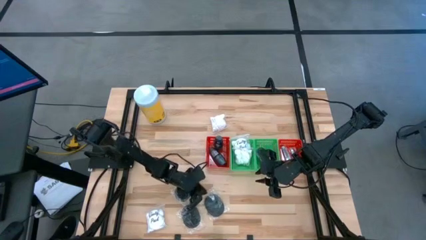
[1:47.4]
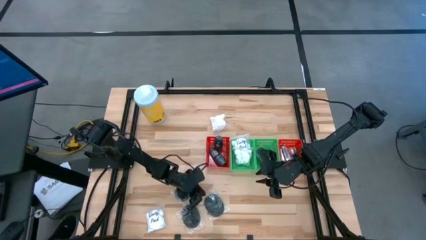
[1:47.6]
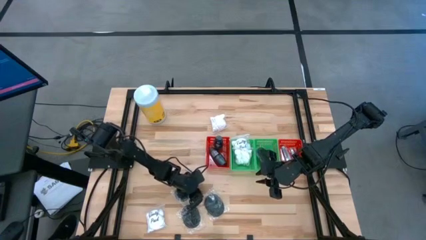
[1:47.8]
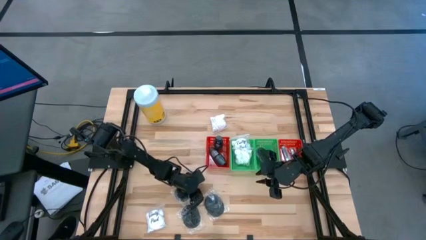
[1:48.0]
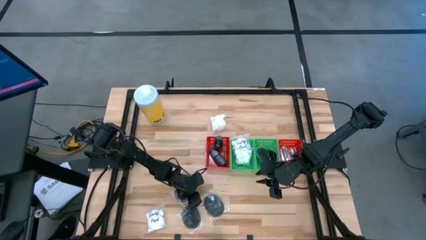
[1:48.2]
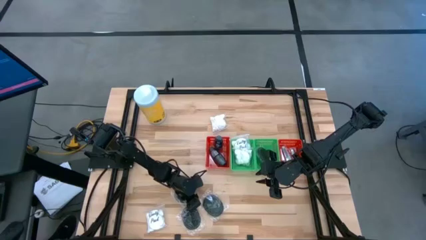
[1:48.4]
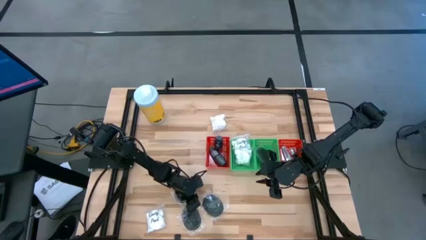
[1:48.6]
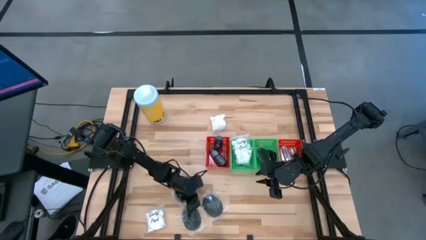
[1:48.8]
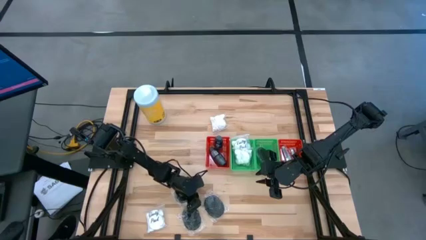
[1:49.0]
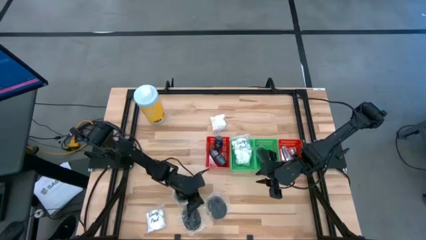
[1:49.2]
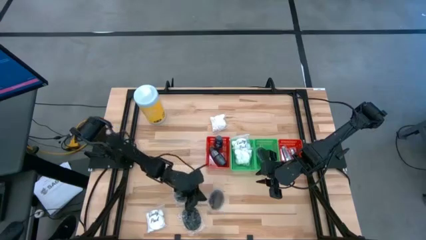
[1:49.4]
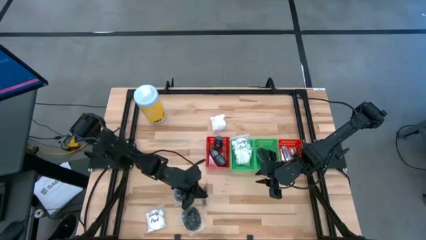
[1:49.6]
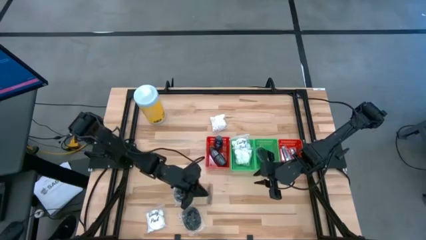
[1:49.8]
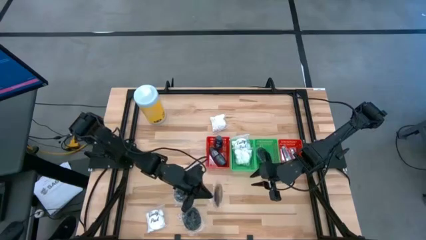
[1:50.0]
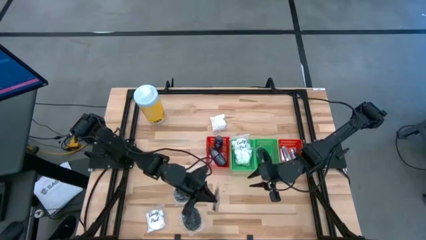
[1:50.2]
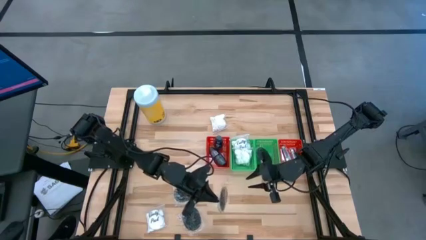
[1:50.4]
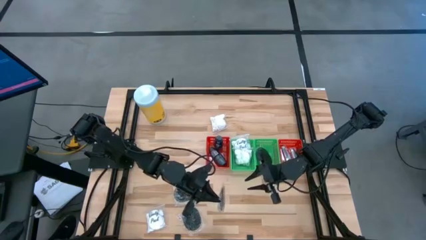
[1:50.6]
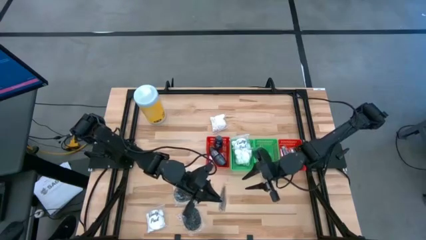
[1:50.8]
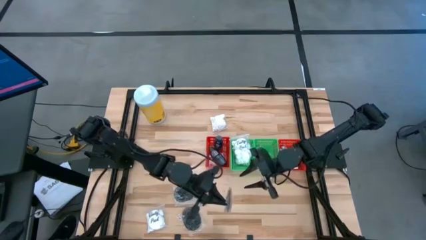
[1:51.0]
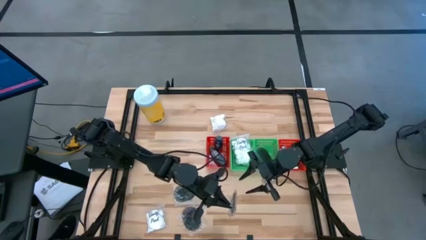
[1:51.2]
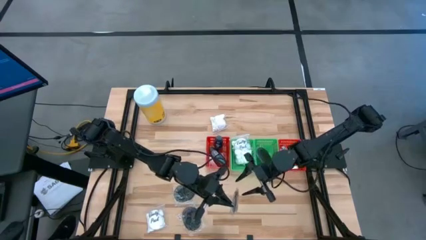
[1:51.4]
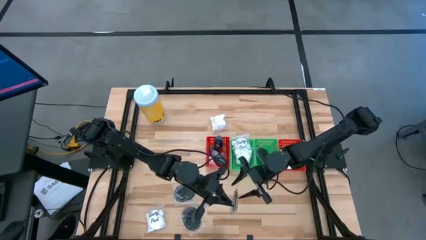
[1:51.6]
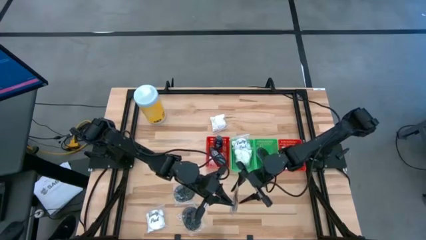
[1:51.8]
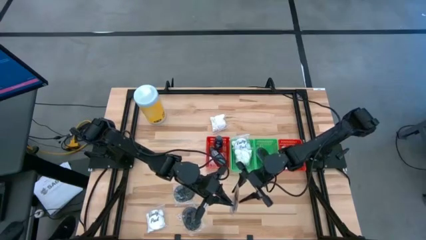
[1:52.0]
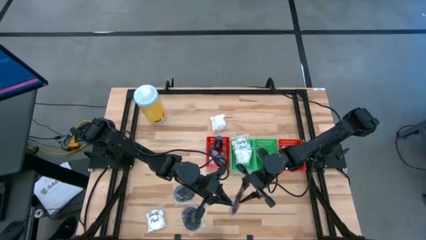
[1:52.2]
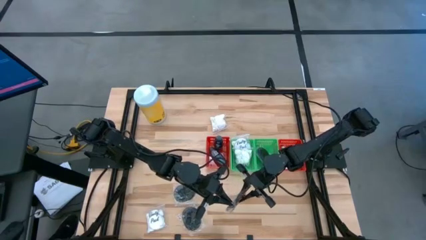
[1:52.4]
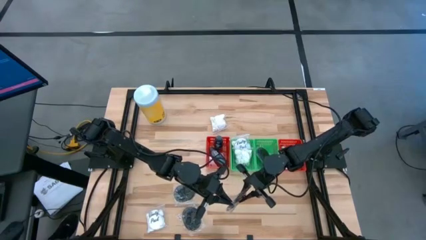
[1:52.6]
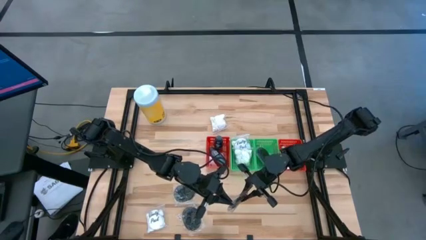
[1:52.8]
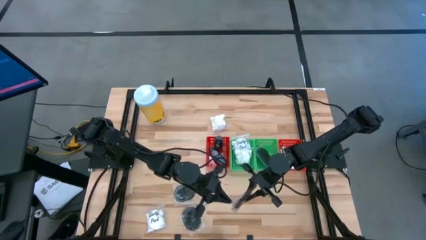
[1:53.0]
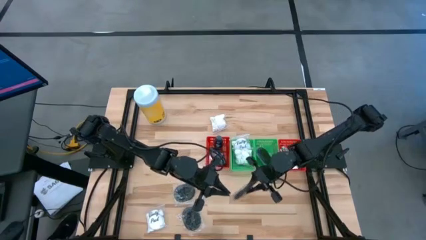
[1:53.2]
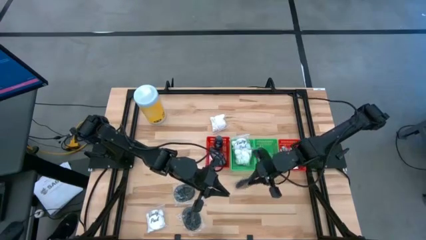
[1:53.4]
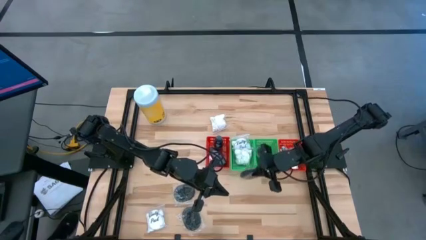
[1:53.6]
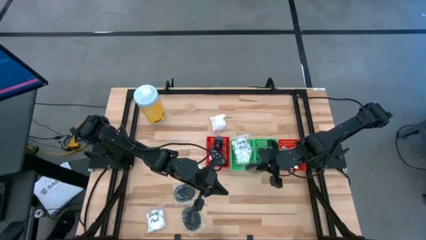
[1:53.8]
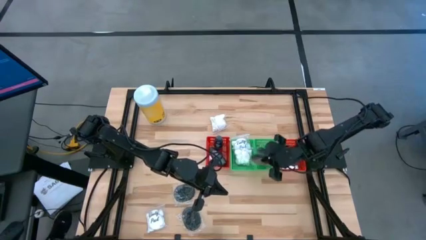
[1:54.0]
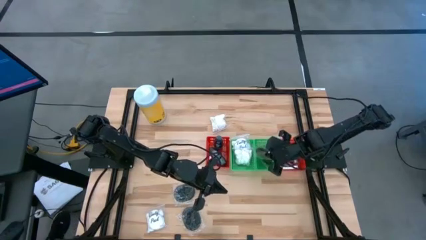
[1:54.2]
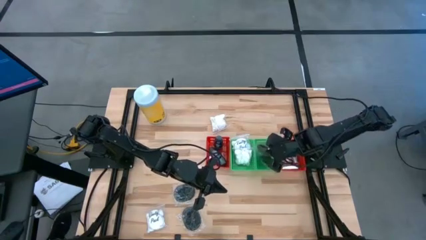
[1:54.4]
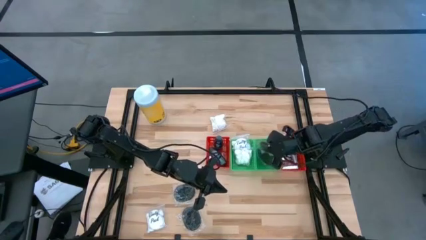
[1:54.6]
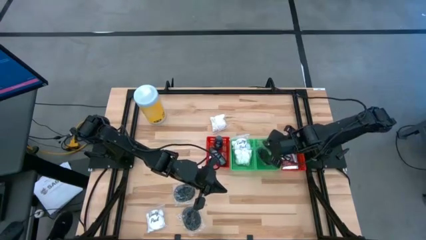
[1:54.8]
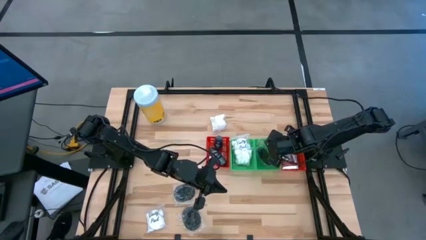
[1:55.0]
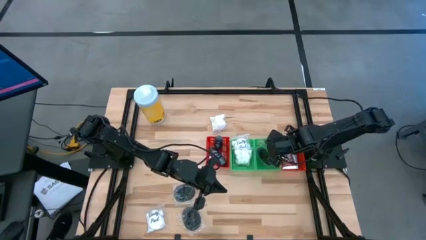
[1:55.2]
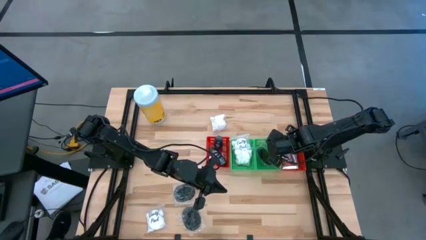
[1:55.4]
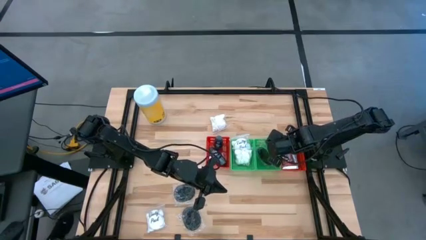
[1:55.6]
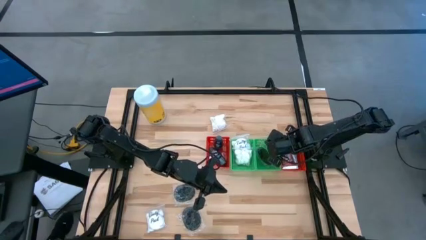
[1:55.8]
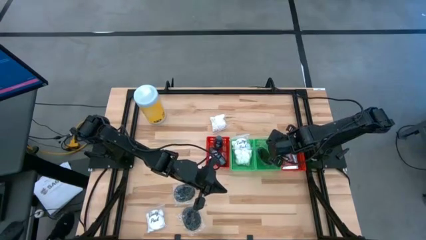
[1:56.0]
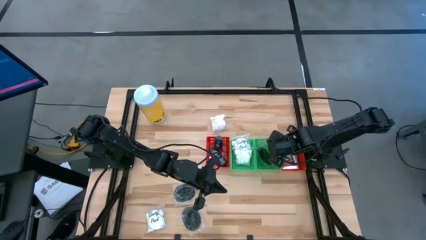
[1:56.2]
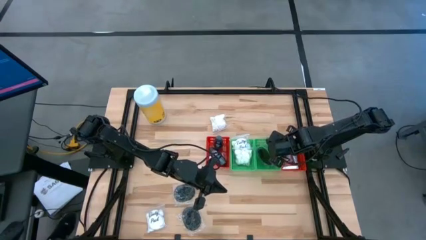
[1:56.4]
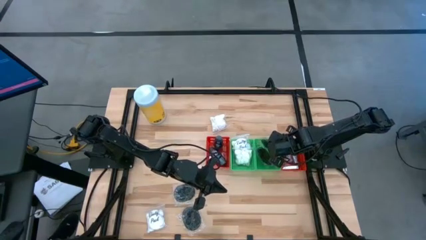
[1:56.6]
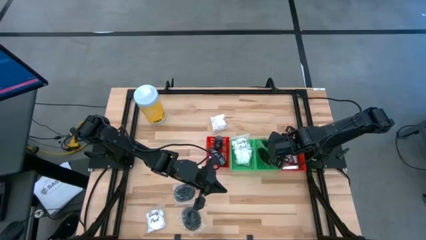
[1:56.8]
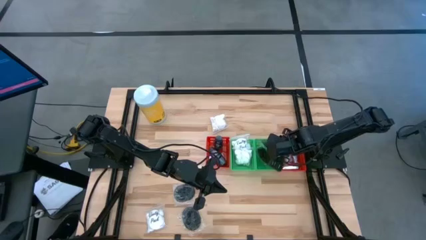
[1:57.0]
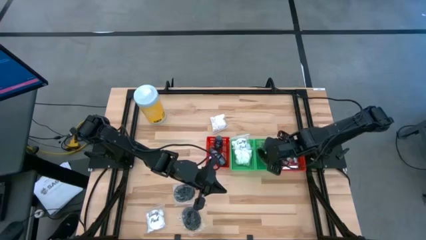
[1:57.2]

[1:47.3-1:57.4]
Task: Pick & Place Travel size toiletries
Put the black hairbrush into the right green bin

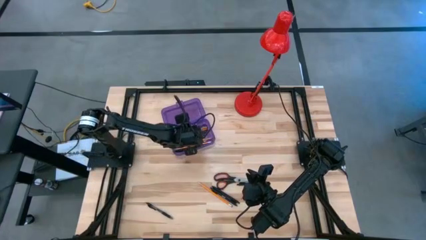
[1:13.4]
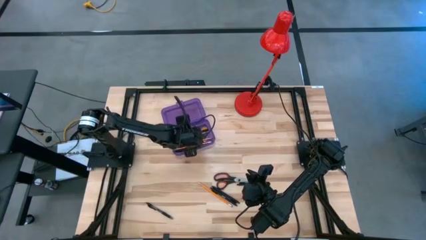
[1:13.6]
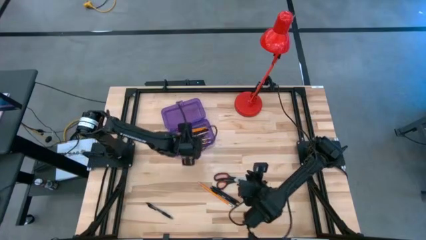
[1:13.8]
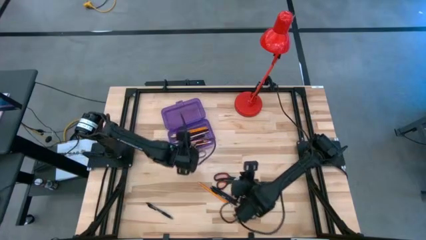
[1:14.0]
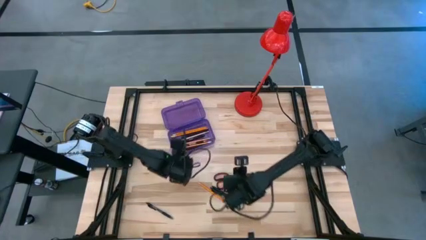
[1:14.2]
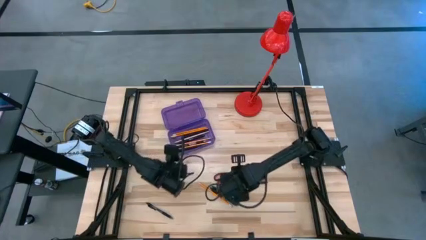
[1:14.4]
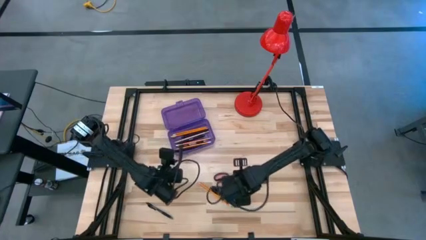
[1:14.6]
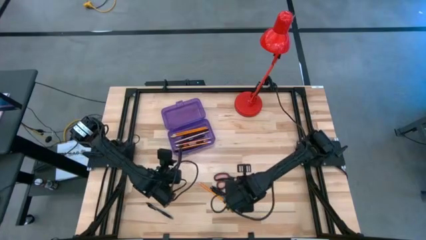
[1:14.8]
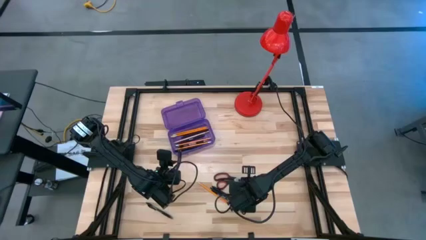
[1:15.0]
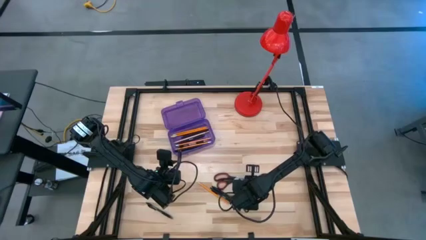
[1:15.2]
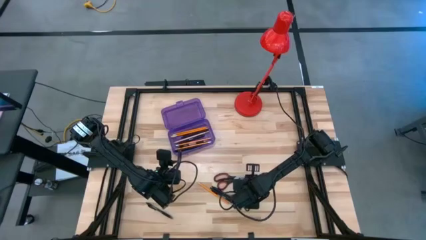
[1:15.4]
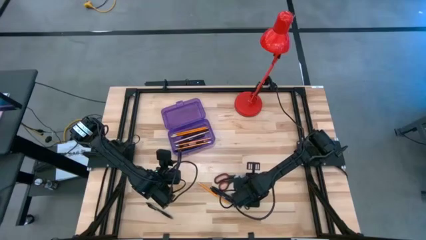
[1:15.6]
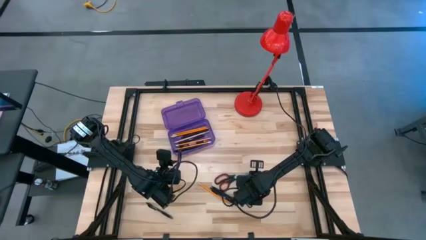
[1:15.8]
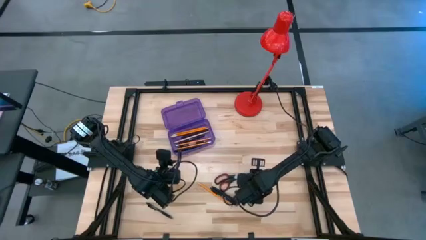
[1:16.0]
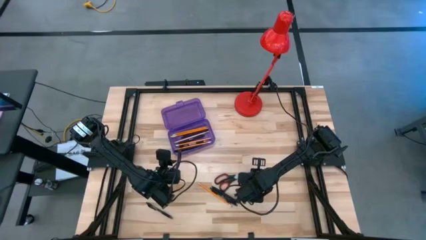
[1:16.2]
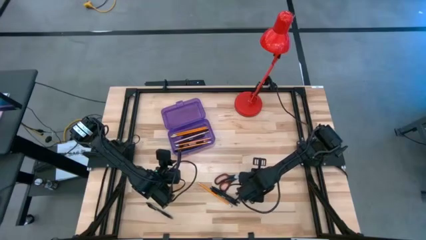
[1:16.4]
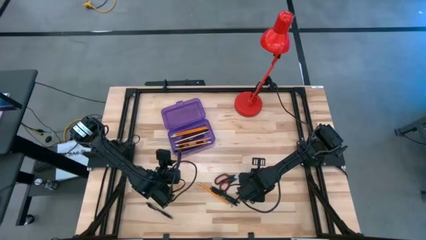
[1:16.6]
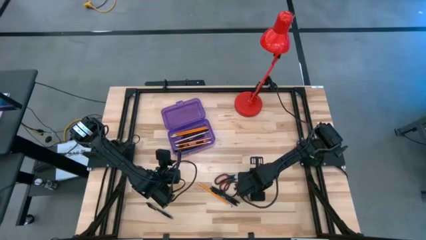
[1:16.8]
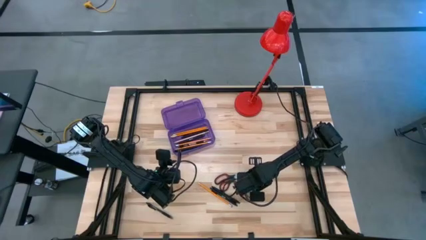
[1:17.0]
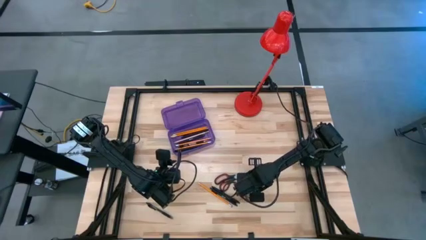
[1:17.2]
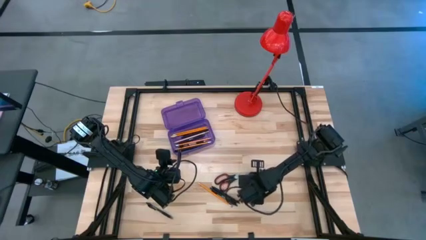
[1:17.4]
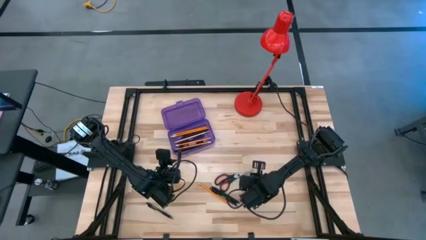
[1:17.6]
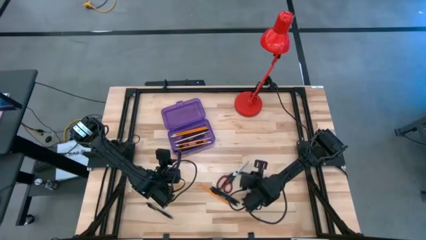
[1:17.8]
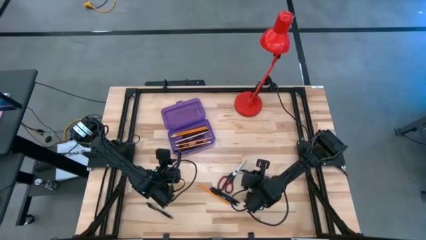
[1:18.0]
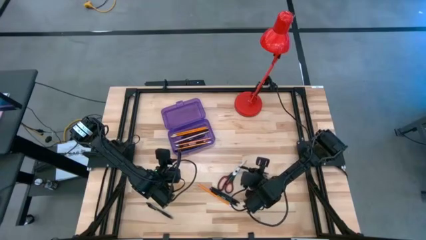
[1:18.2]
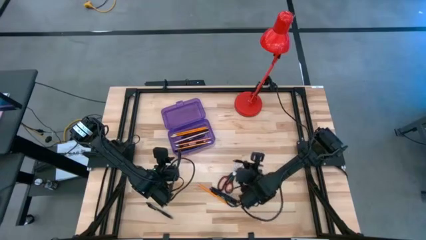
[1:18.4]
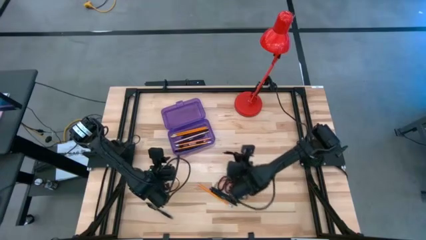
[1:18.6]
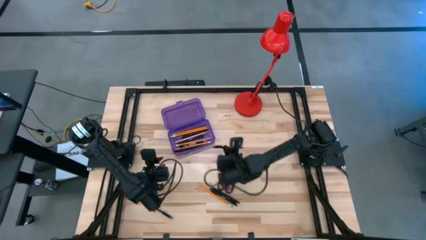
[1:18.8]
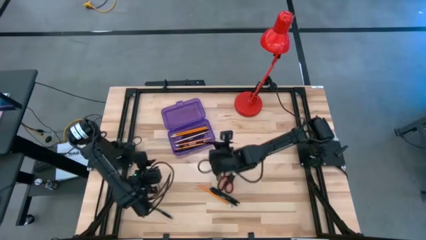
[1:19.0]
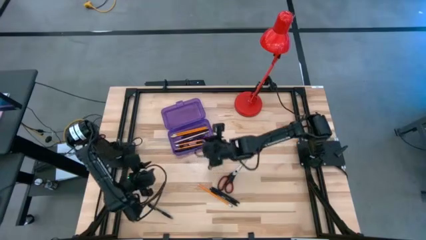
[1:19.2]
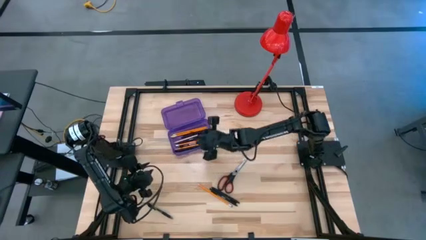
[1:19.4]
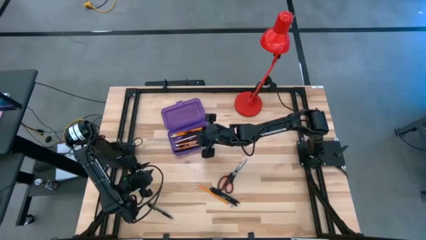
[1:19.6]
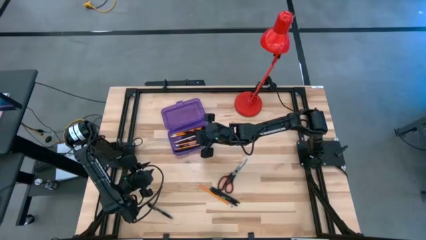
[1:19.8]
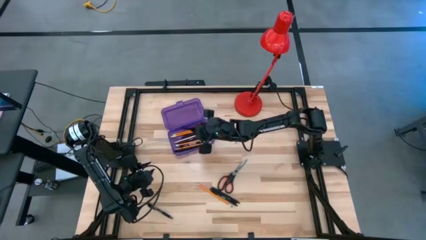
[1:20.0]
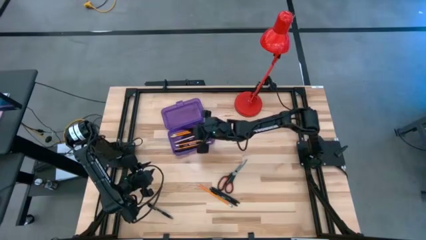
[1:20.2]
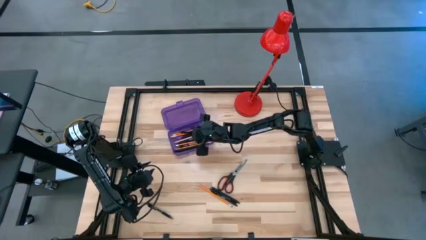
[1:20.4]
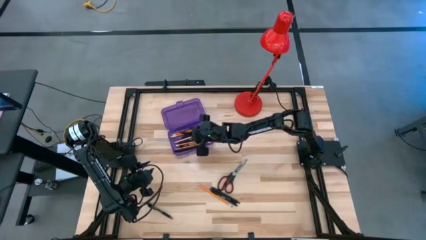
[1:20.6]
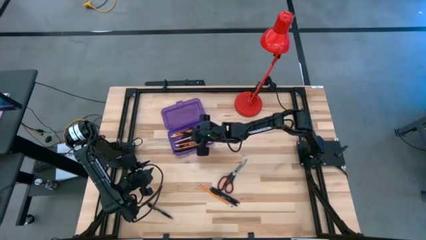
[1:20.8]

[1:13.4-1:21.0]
Task: Pick & place school supplies into a supply box
Put the black pen into the purple supply box
